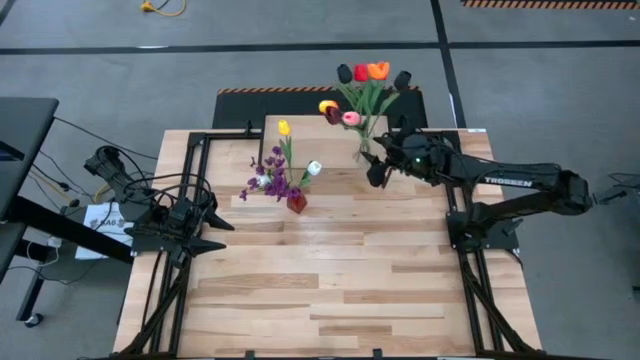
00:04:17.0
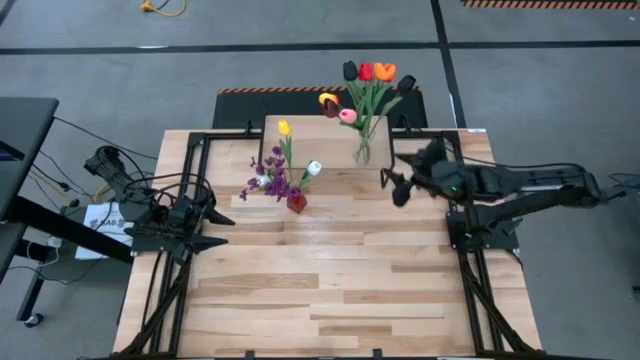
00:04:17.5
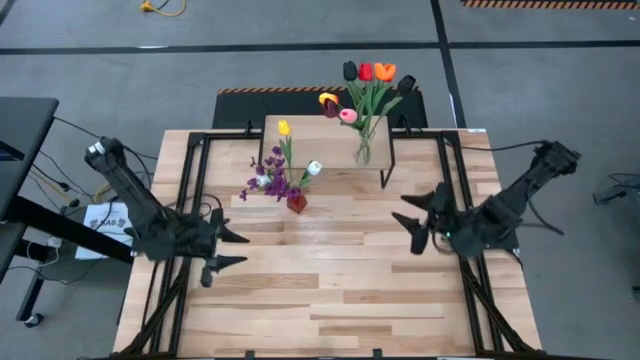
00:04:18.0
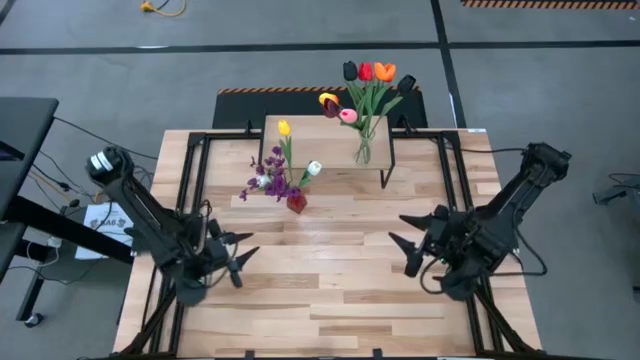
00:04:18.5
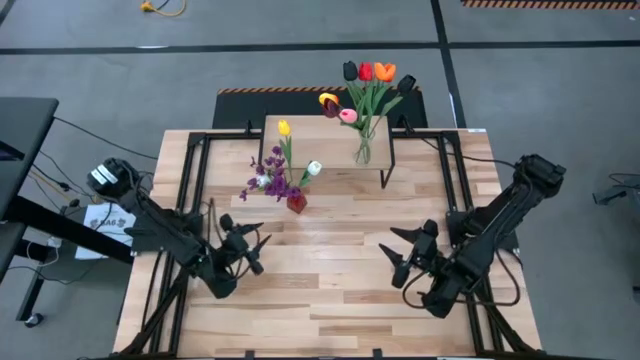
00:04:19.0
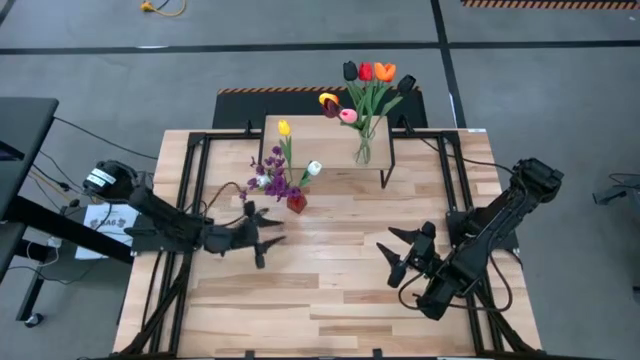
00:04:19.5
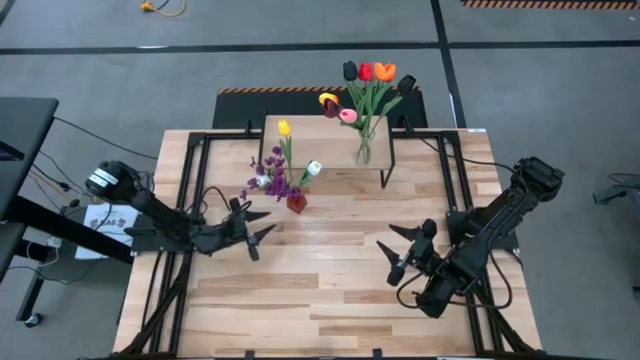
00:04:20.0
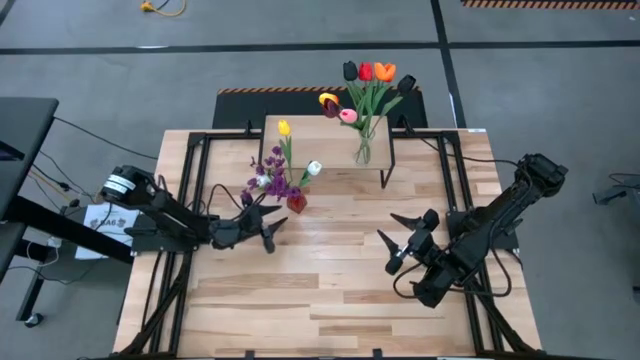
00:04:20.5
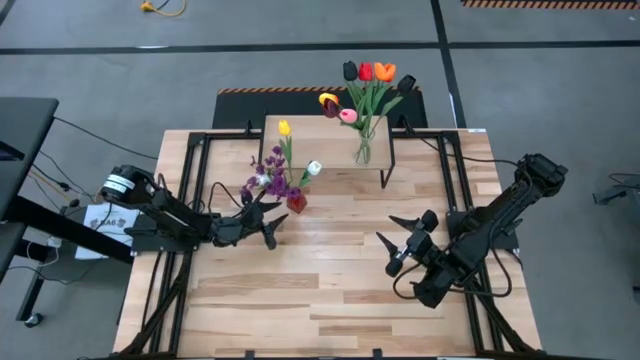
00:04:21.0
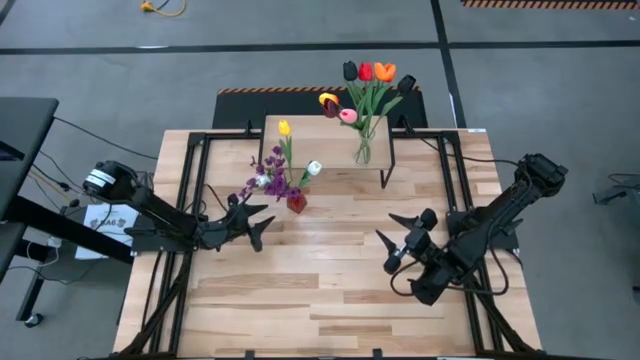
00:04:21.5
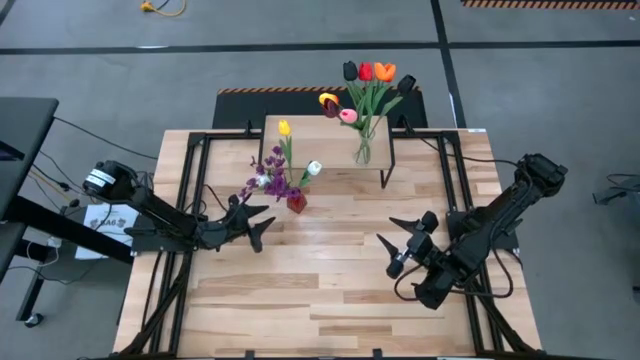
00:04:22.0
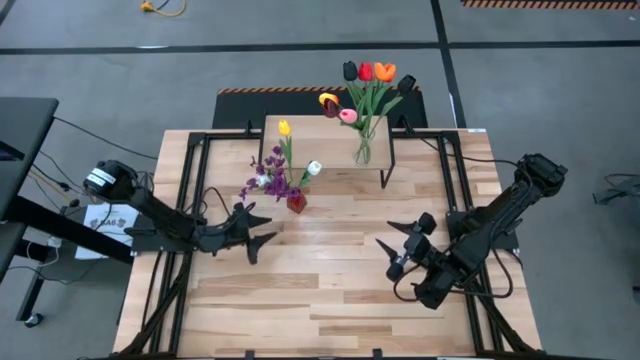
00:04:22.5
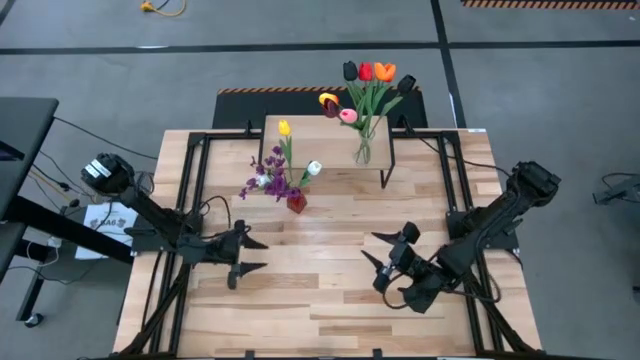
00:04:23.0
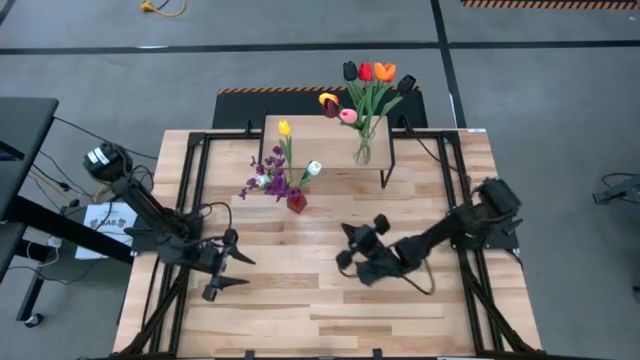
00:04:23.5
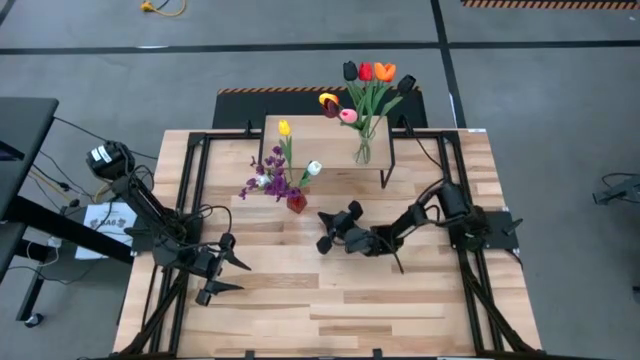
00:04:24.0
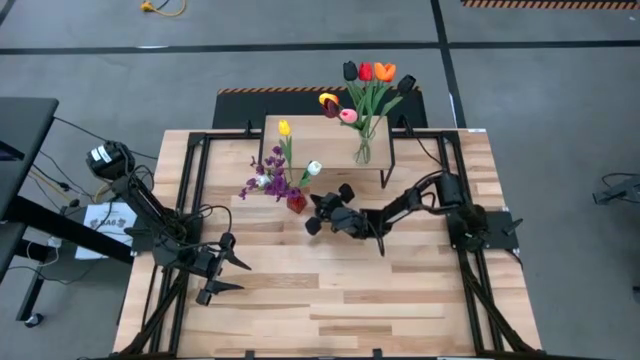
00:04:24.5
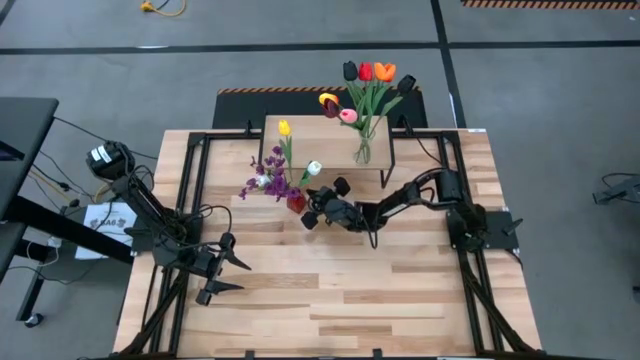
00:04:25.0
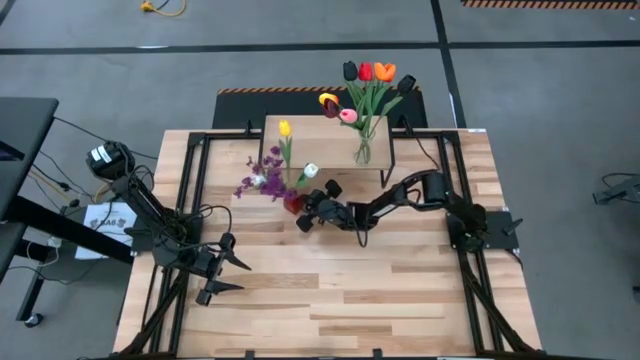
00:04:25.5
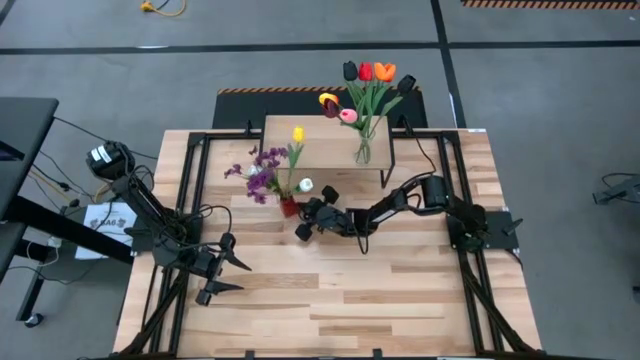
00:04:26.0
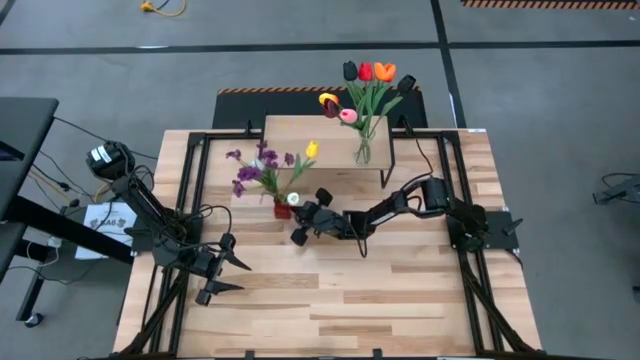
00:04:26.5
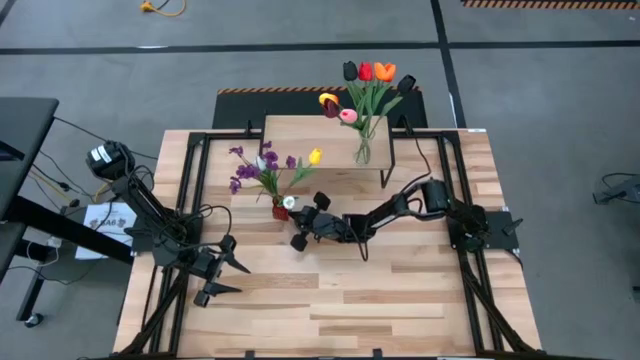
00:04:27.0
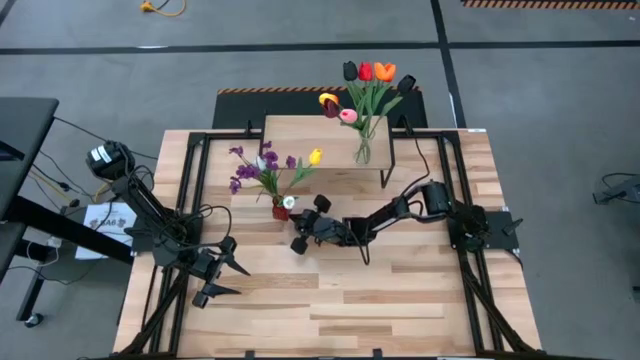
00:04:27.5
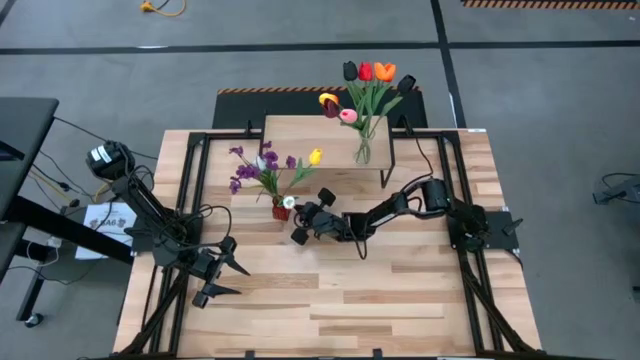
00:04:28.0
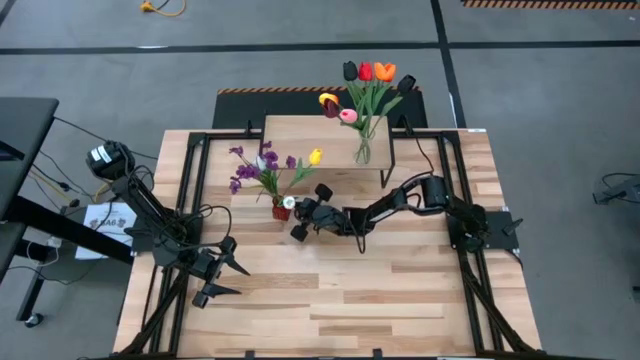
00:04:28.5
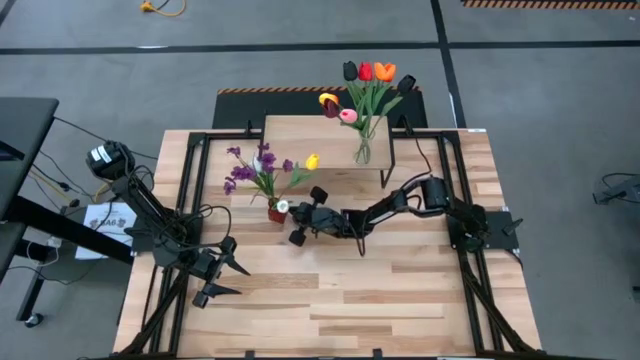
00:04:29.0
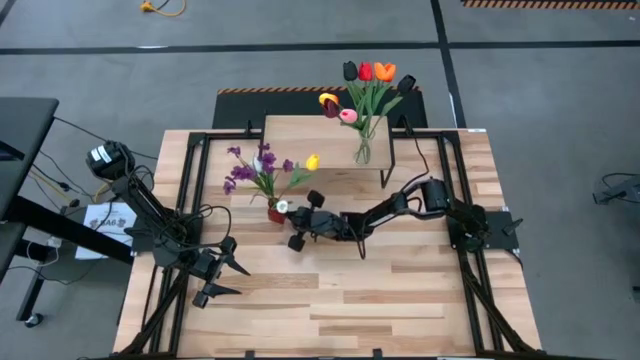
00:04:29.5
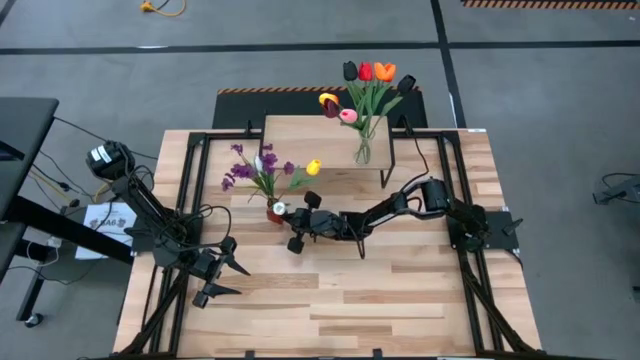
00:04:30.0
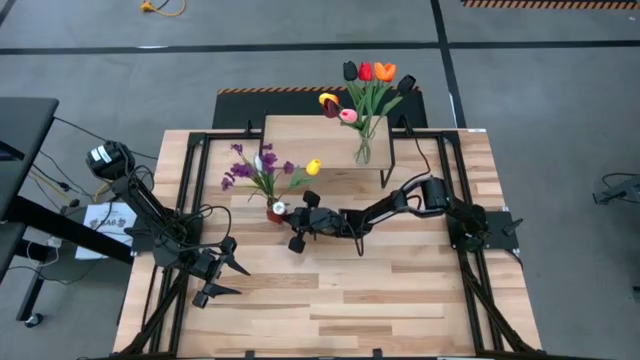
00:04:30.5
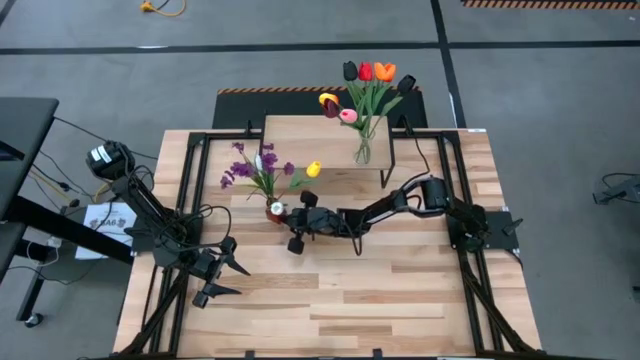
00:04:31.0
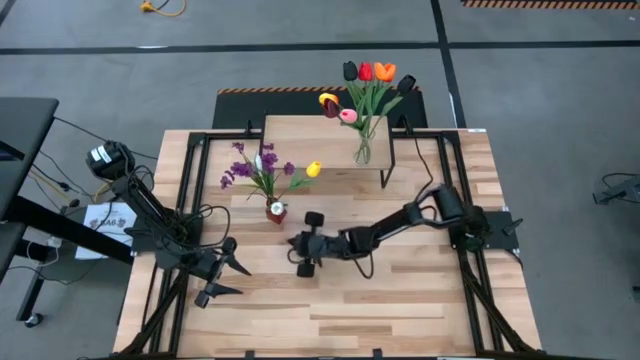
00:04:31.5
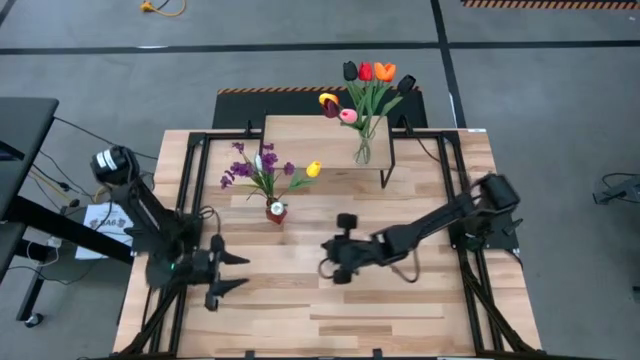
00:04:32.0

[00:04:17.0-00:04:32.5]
Task: Pick and place flowers into a vace then onto a shelf
Put the red vase with flowers on the shelf

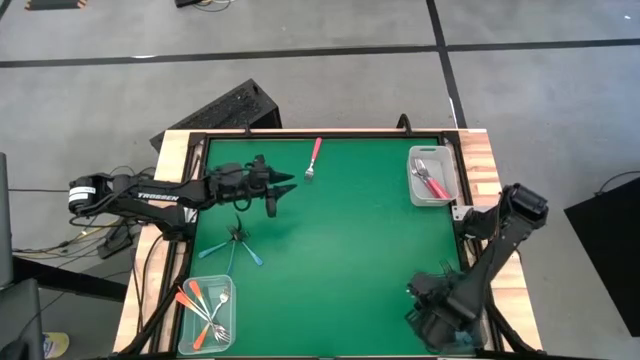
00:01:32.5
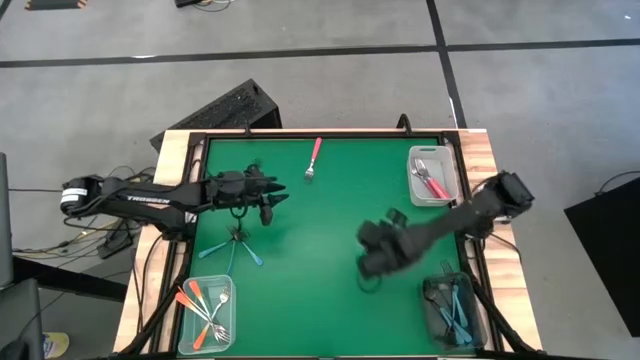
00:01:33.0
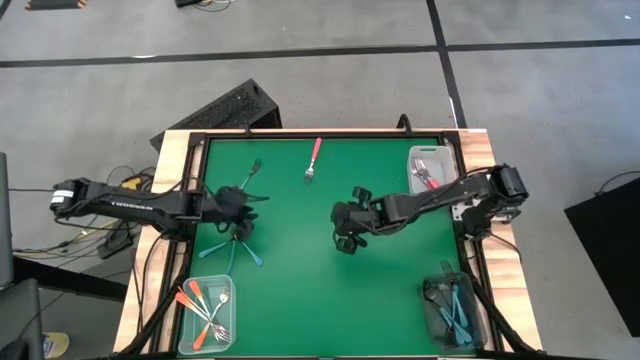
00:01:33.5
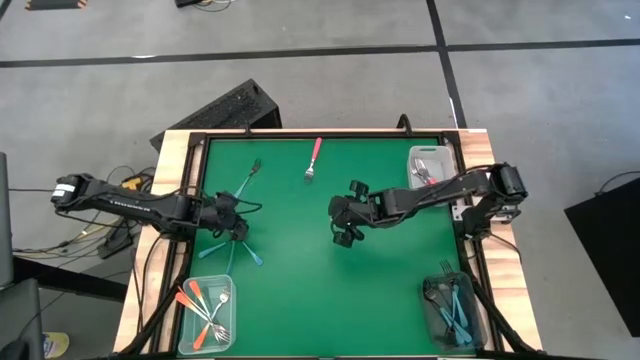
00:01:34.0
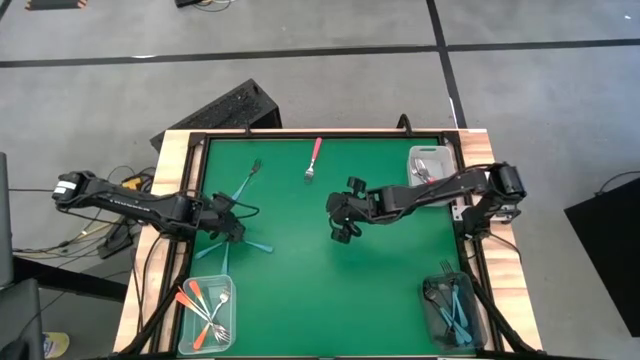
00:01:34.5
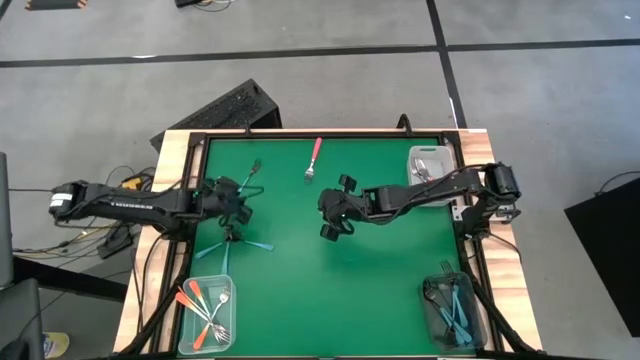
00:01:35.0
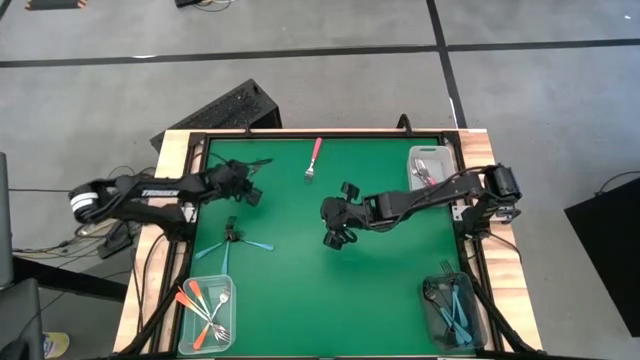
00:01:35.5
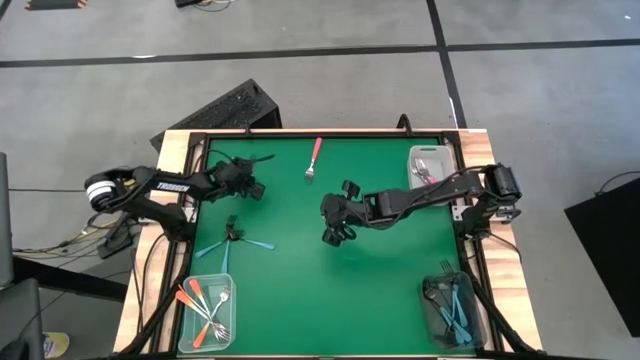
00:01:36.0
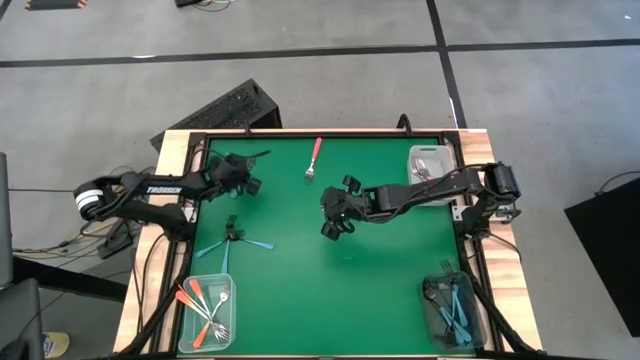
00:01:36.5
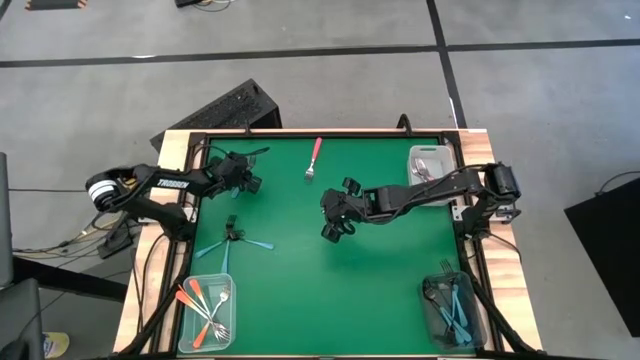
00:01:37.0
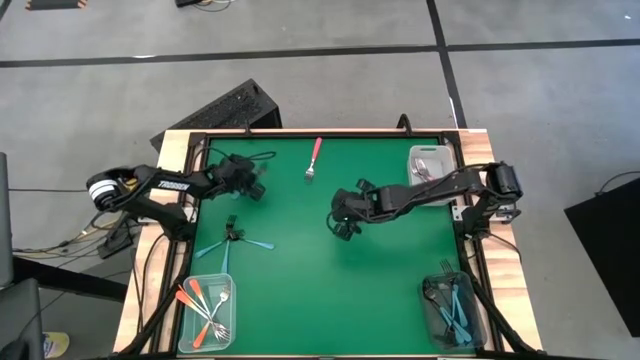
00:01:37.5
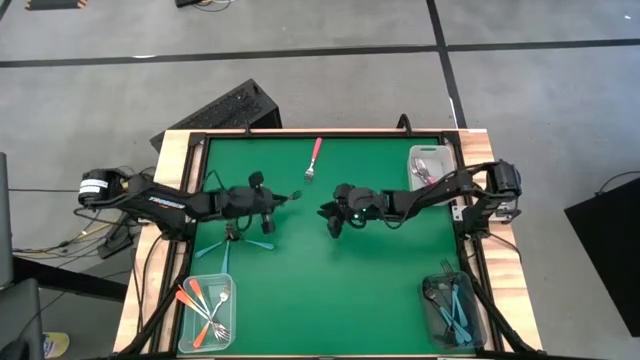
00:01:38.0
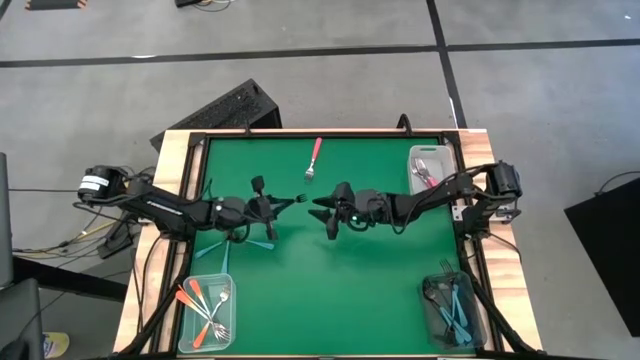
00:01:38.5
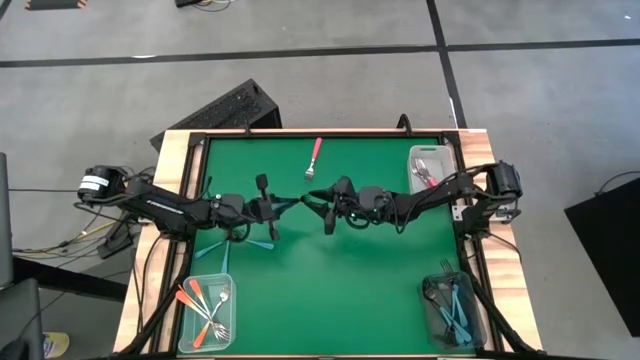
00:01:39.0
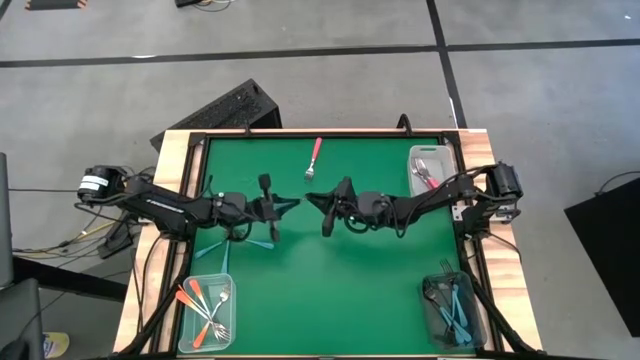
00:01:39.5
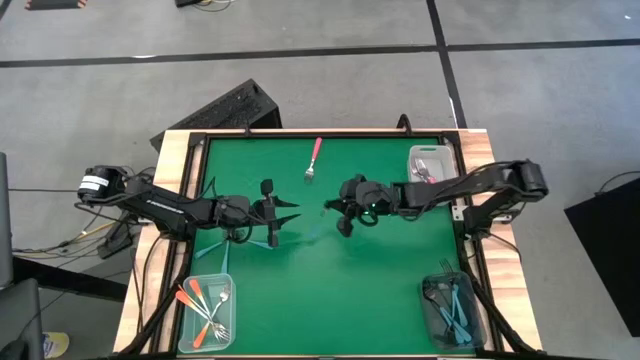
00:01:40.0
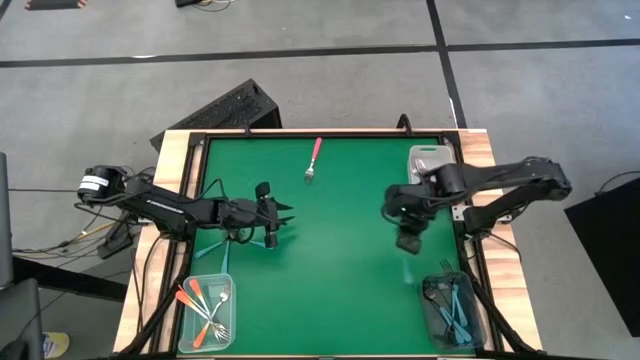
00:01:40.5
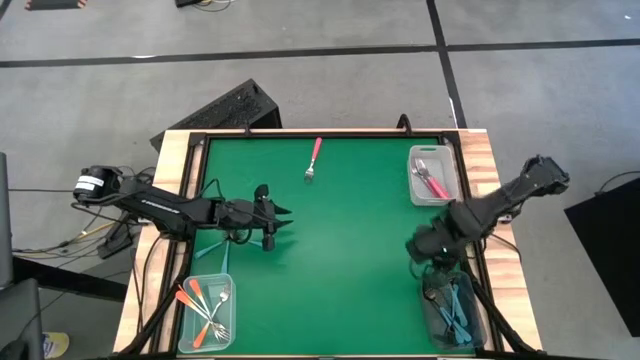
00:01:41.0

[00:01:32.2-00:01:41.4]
Task: Sort silverware by color (type)
Put the blue fork into the black bin
